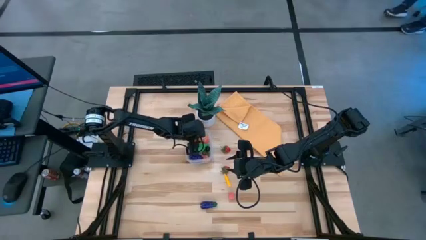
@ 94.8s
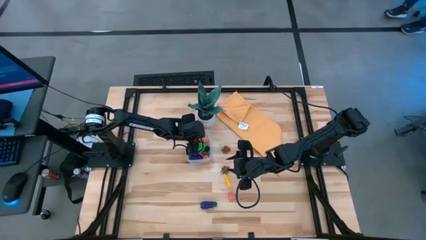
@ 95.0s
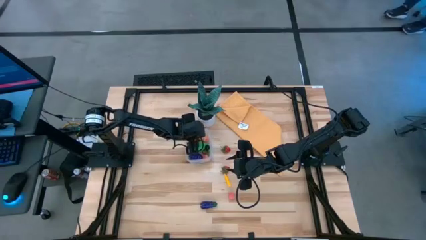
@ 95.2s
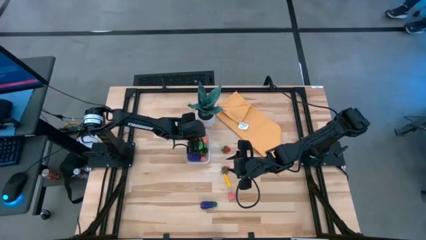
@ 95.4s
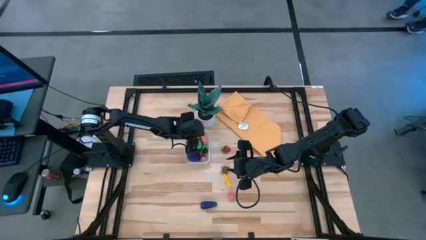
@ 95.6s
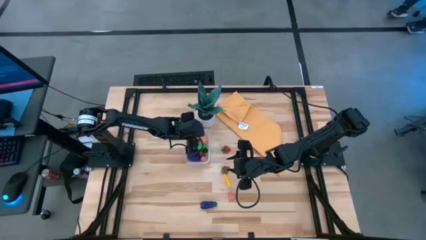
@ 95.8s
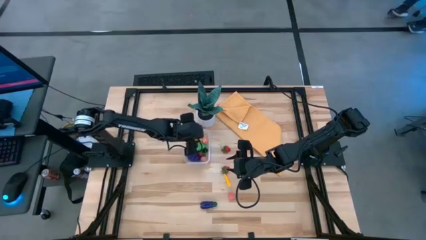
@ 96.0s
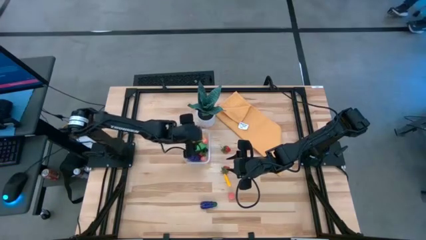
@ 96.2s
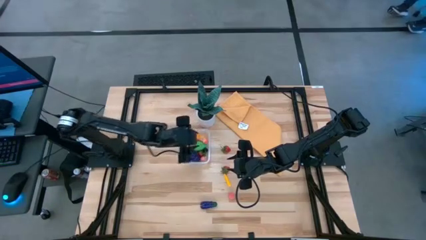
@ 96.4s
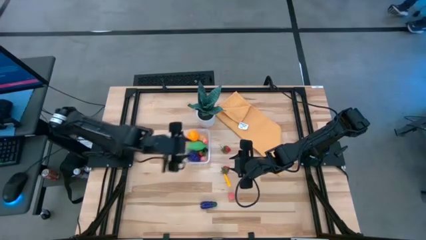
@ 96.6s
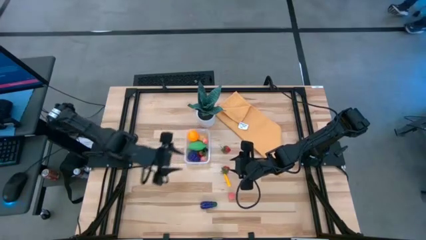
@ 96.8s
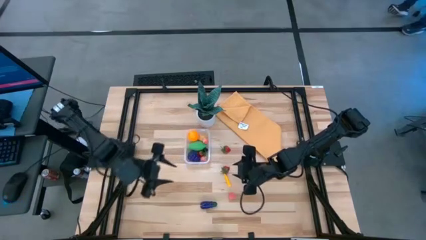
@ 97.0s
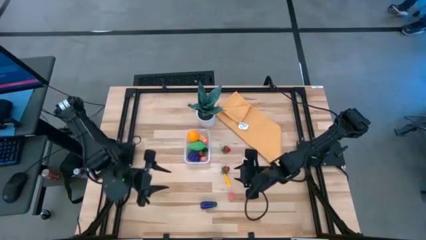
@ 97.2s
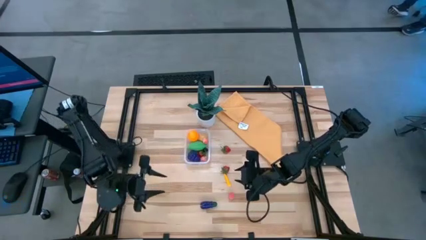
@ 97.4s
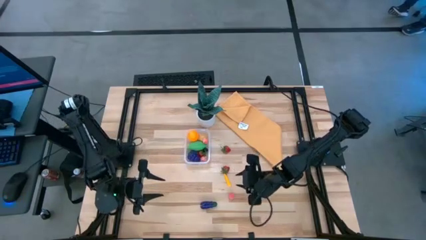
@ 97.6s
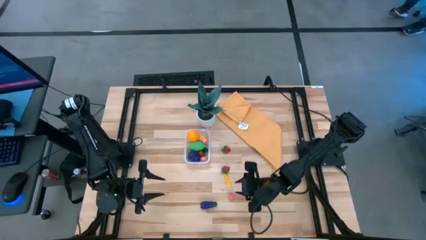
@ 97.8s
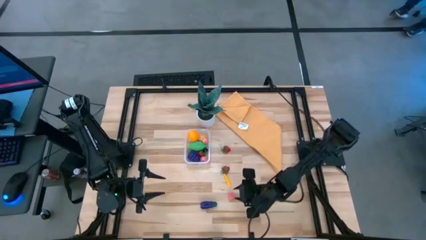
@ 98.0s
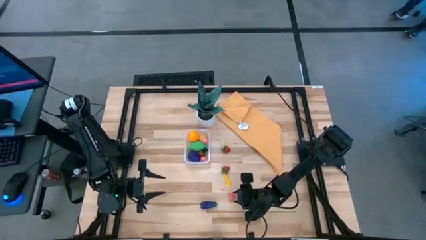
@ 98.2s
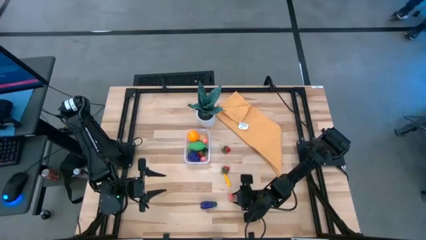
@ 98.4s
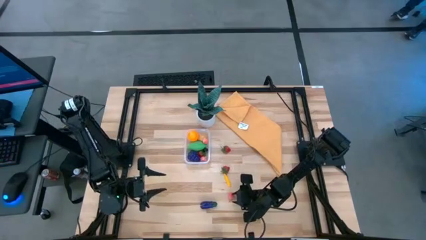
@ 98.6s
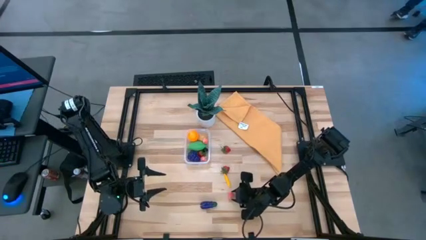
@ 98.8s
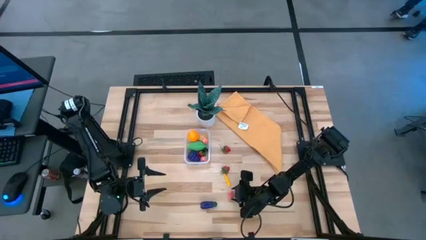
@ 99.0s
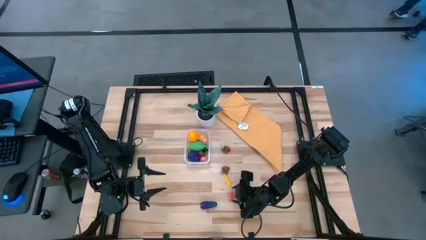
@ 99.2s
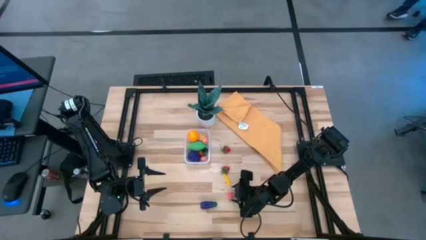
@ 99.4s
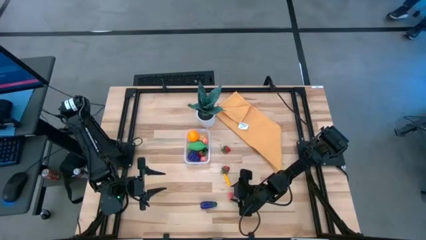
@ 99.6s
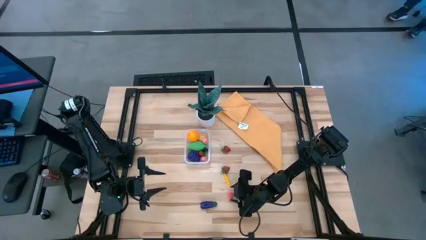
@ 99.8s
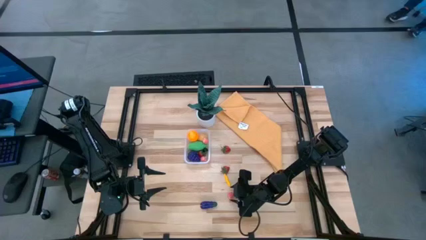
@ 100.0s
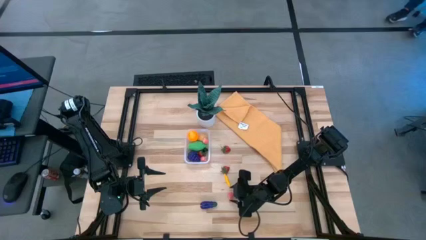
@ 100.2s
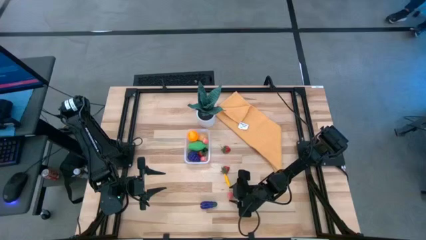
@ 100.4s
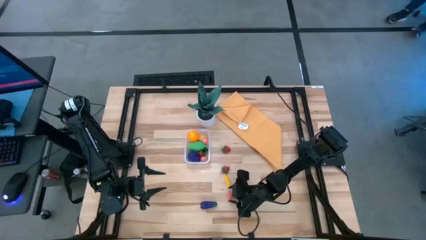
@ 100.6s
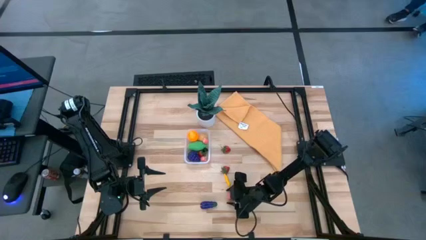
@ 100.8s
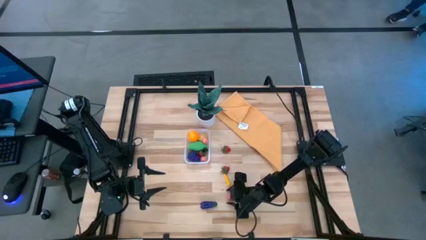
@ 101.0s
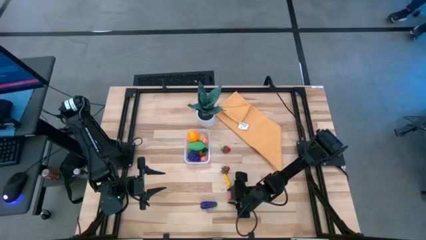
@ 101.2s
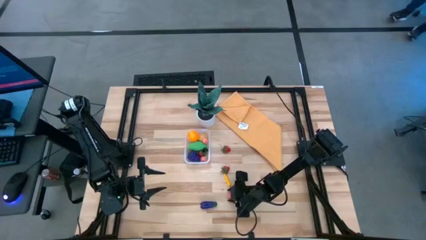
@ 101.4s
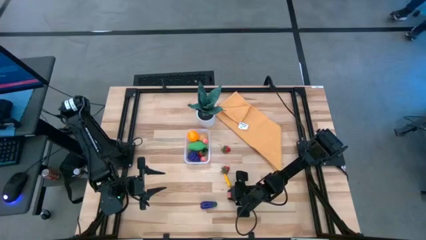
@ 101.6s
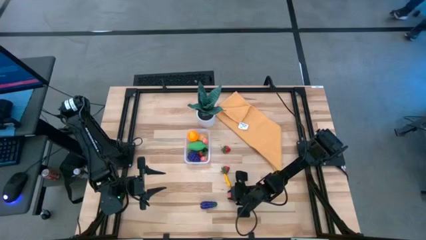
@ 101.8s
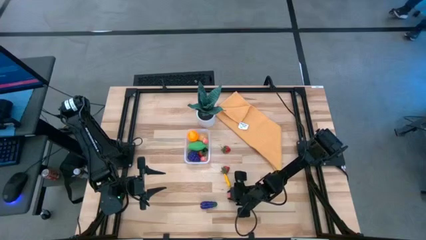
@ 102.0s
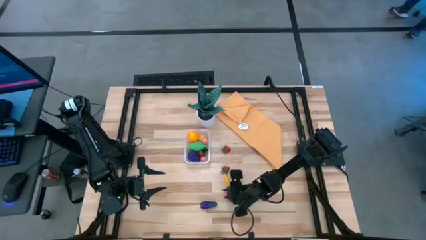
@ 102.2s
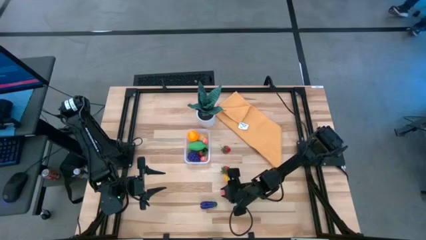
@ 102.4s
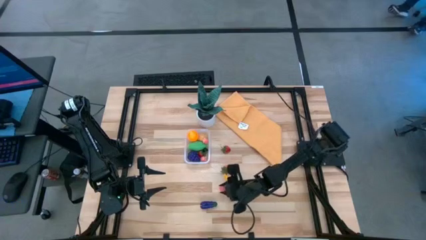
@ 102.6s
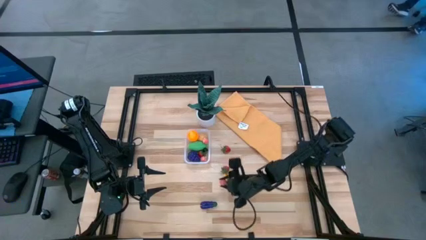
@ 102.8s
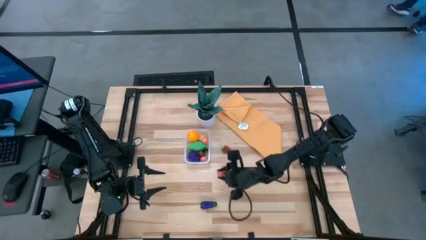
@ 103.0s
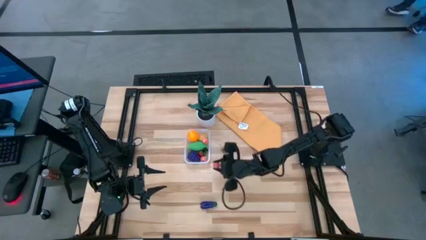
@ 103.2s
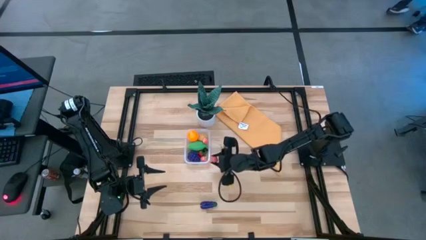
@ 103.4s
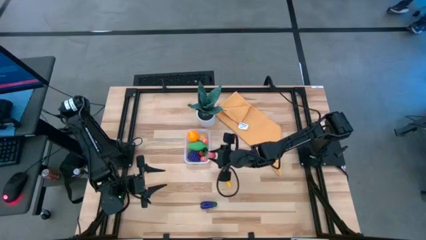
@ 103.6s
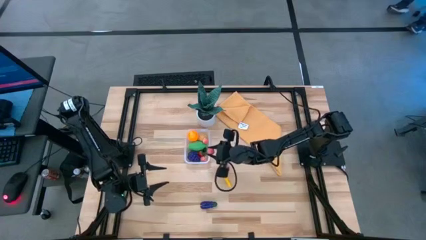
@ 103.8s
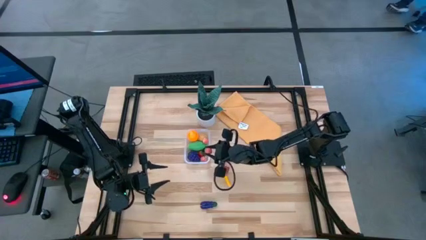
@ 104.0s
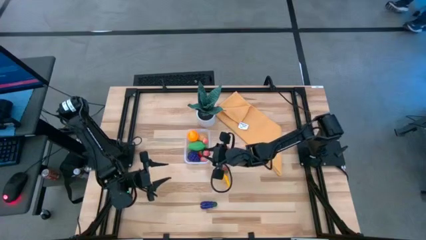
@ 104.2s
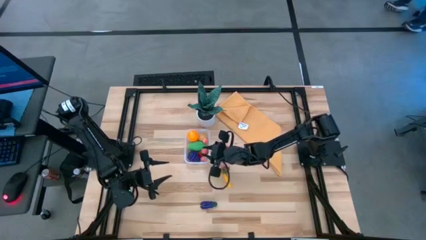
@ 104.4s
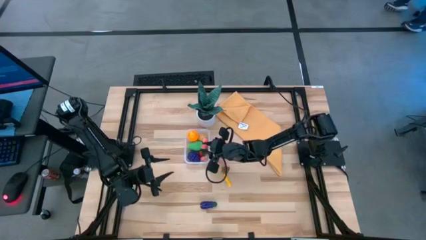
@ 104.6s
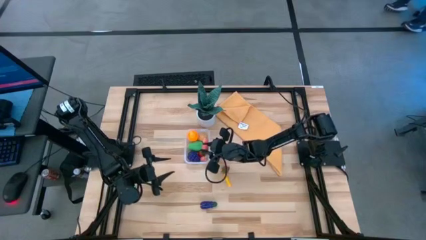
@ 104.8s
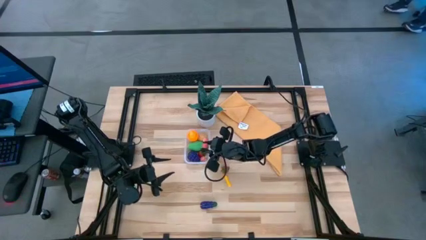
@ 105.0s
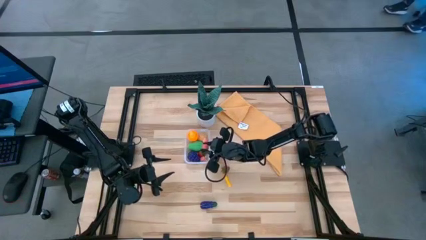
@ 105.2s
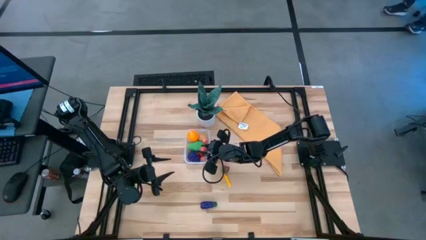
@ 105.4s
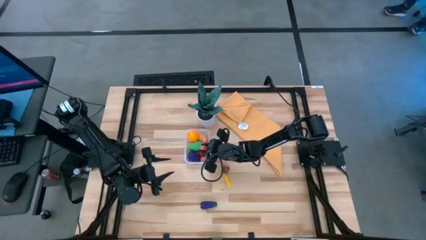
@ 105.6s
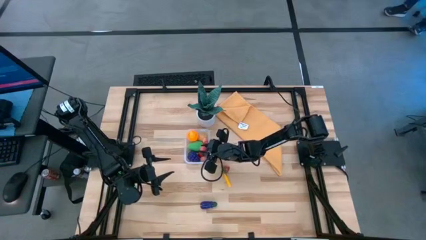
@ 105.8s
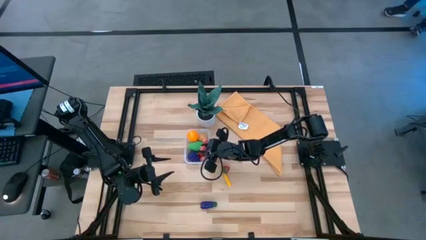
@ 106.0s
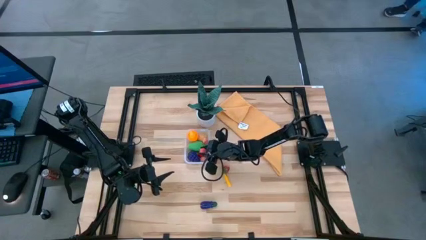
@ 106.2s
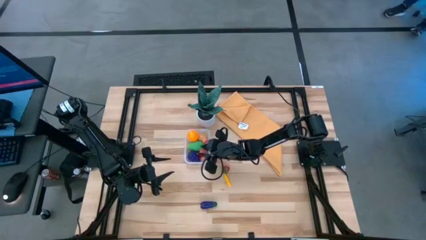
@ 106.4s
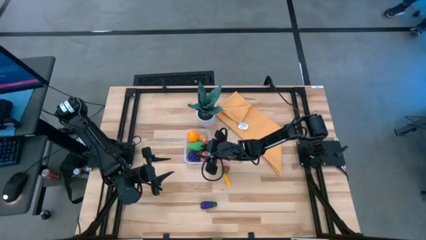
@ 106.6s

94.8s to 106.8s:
Task: Pick and placing Produce into tupperware
Put the peach into the transparent bin

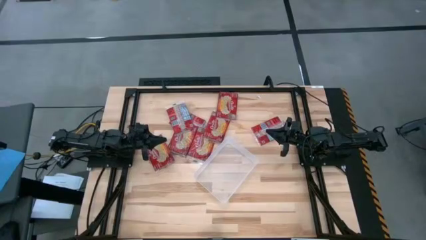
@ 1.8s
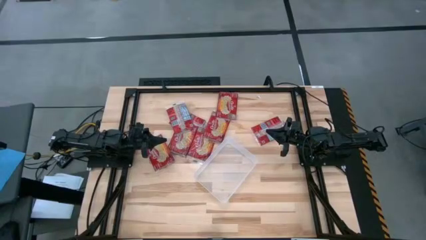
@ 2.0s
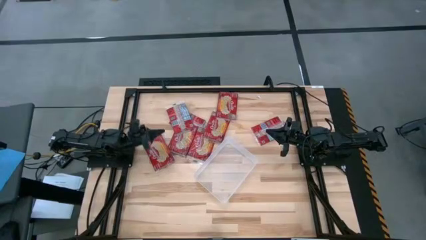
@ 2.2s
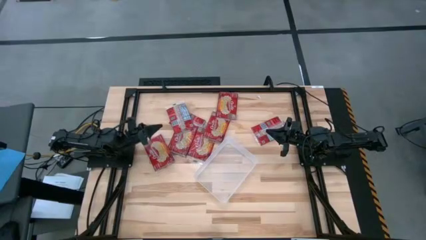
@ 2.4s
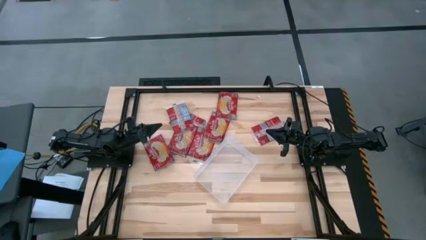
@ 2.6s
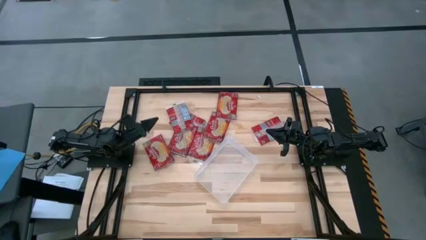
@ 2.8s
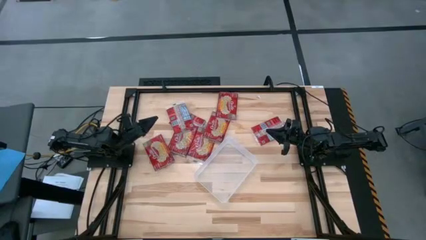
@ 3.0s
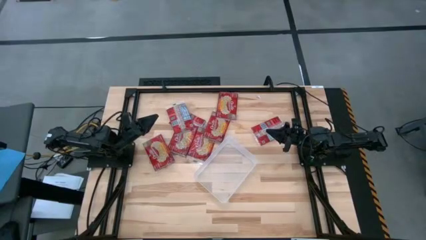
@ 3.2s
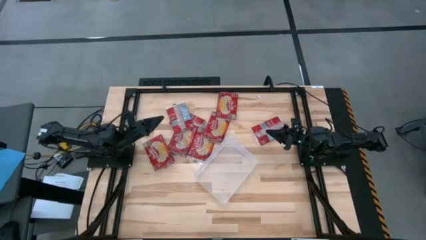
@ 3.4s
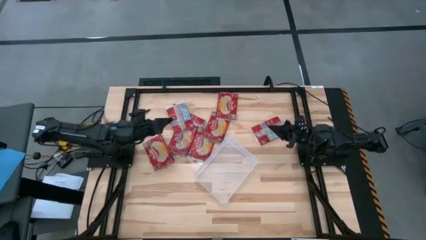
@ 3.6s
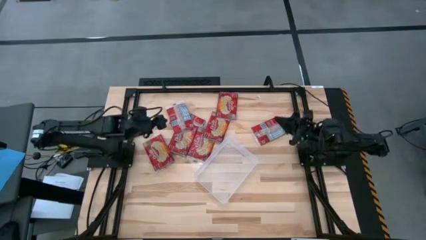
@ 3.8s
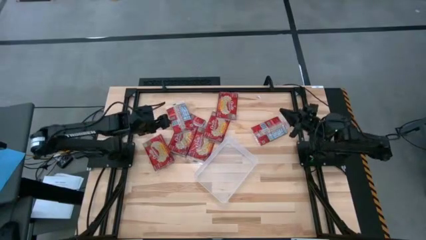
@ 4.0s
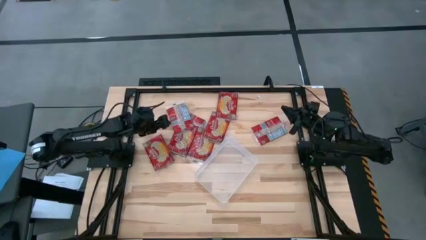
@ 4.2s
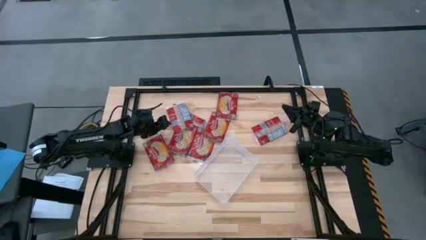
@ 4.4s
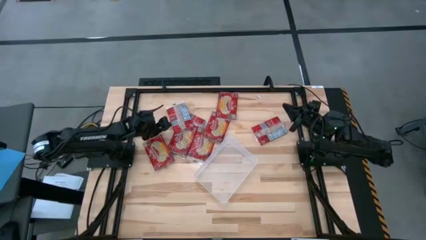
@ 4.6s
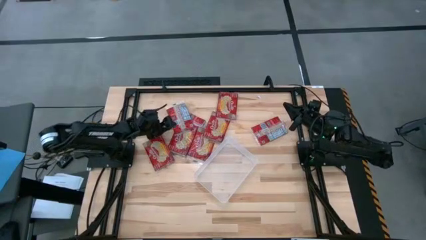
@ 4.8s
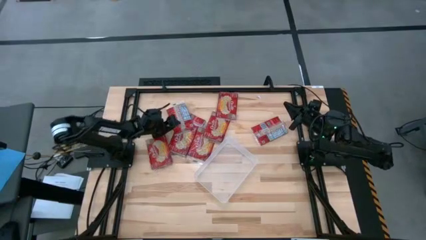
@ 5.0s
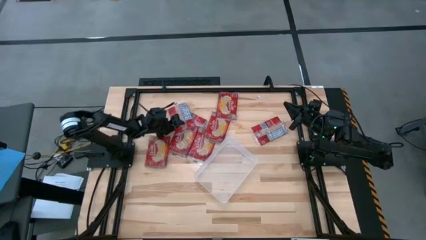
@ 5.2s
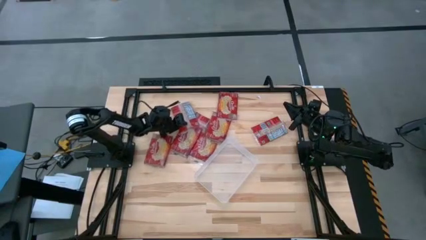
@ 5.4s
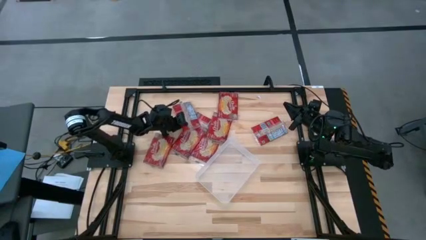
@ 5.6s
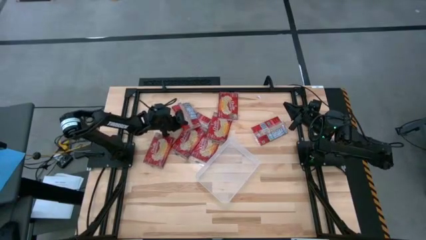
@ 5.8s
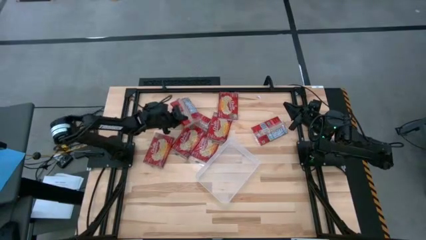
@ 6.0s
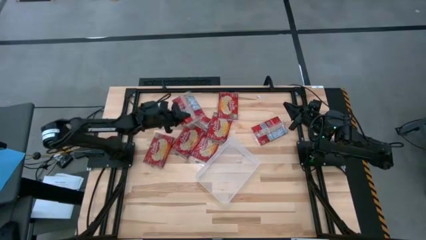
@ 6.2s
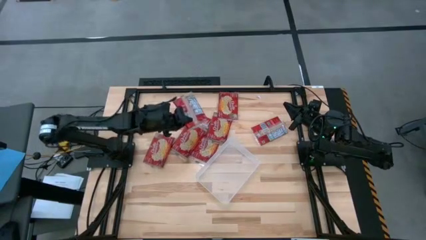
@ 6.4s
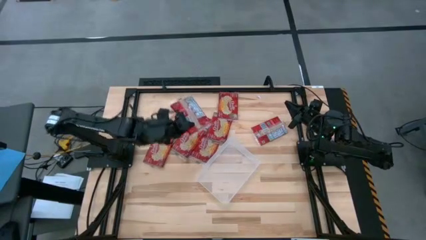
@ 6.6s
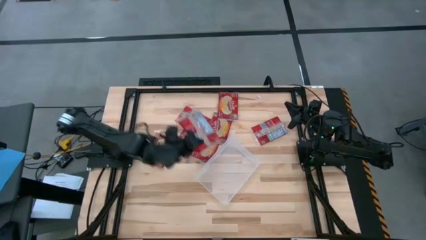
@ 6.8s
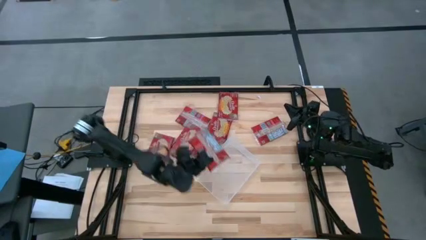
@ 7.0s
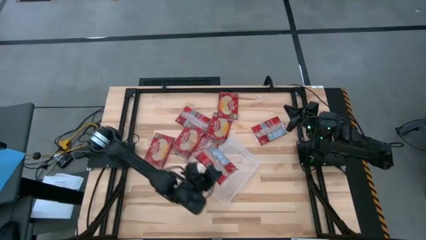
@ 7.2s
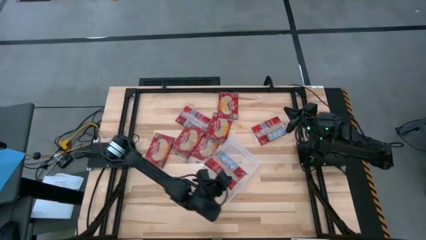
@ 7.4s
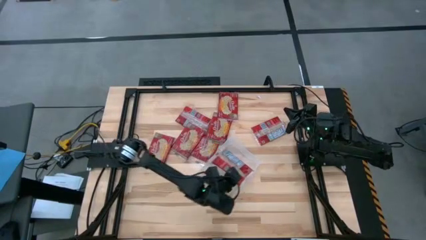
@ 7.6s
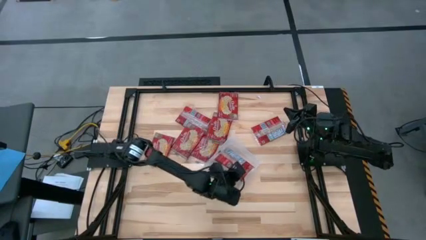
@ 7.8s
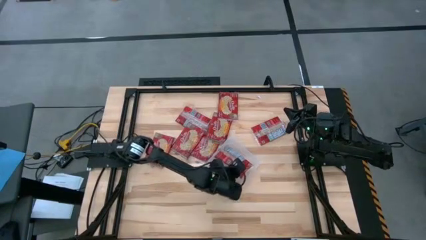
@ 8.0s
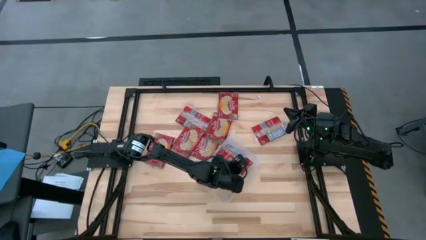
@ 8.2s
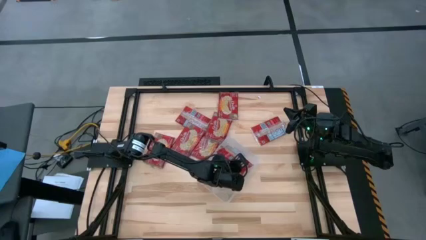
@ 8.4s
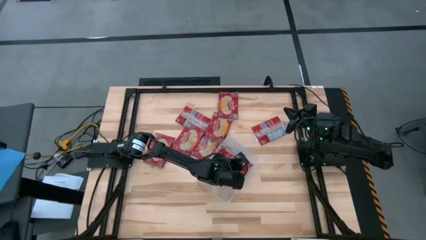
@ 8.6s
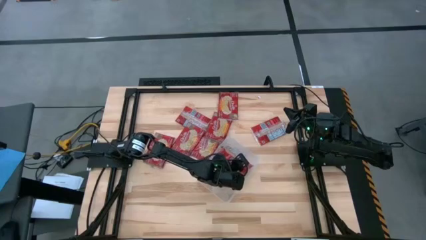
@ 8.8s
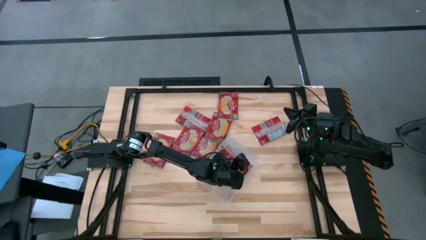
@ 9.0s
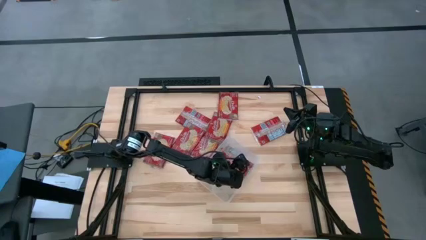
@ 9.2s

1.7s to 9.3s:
Task: Sort popcorn bags into baskets
Put the red popcorn bag into the transparent bin
